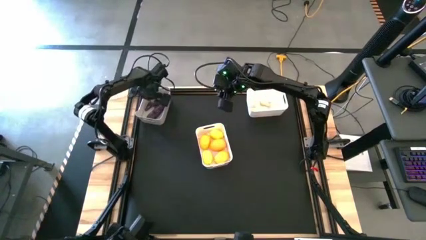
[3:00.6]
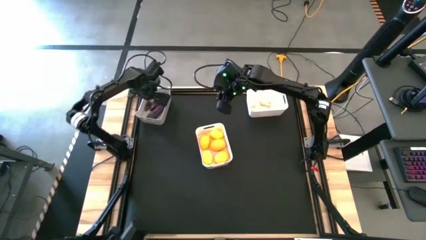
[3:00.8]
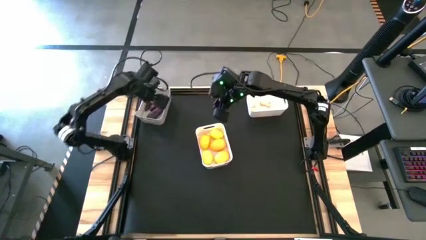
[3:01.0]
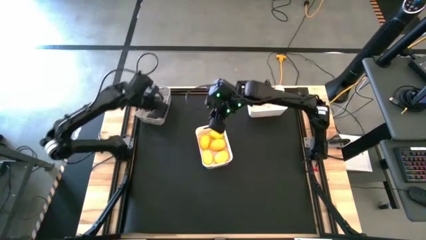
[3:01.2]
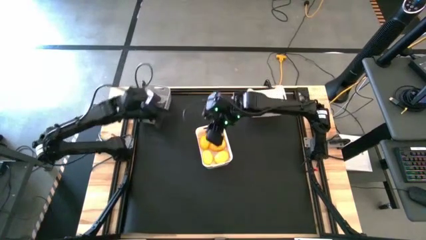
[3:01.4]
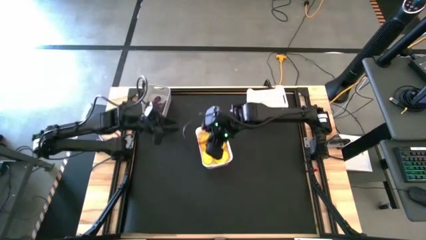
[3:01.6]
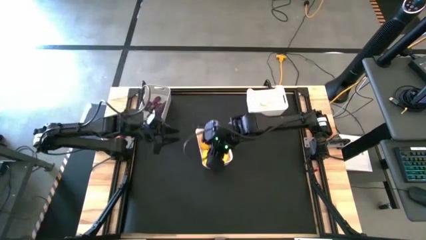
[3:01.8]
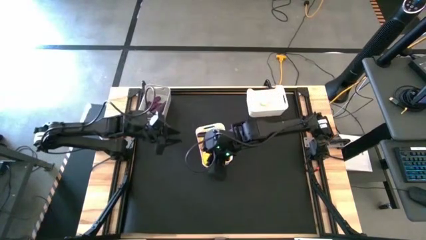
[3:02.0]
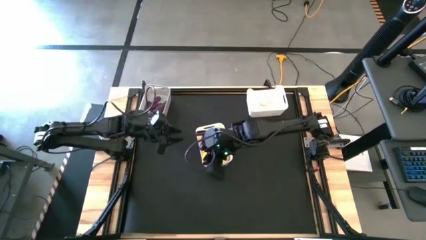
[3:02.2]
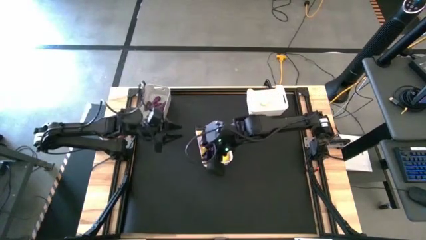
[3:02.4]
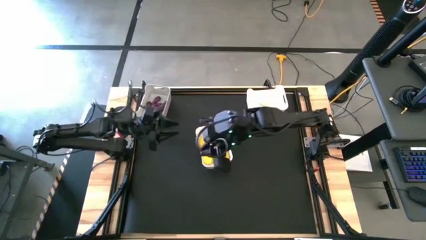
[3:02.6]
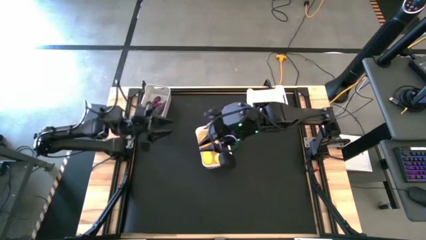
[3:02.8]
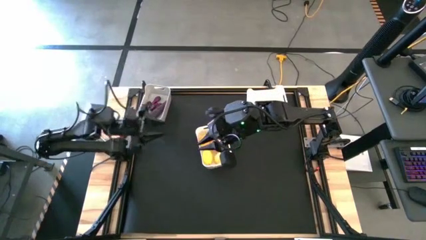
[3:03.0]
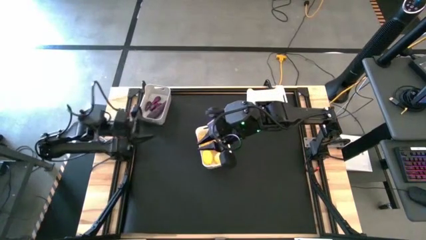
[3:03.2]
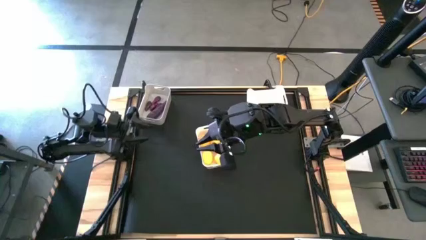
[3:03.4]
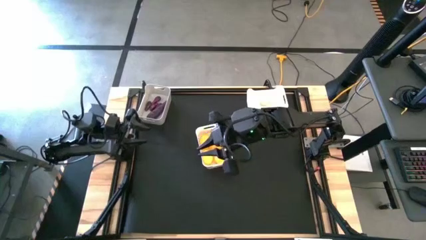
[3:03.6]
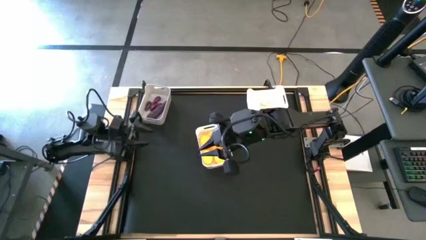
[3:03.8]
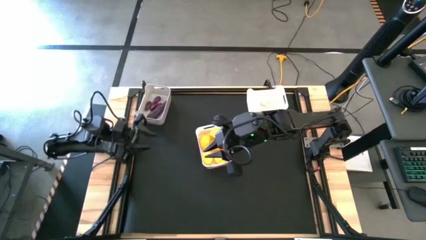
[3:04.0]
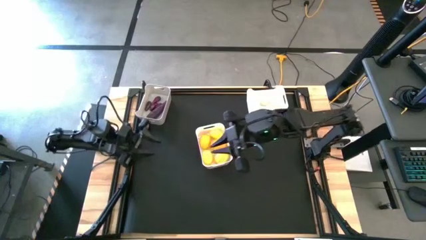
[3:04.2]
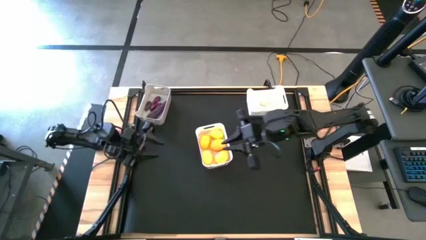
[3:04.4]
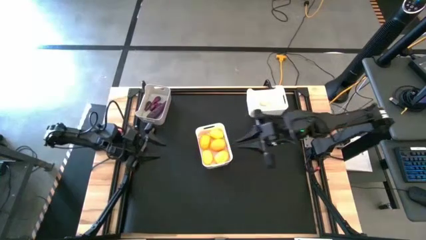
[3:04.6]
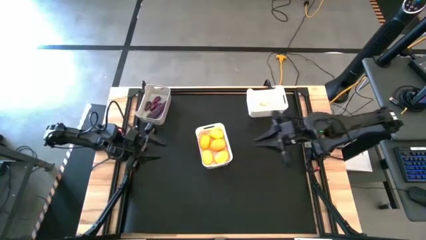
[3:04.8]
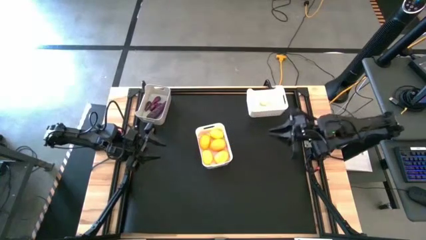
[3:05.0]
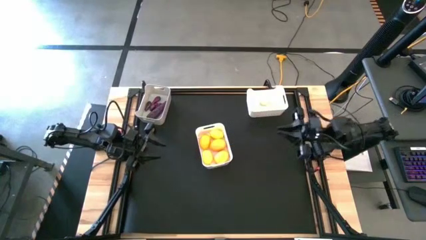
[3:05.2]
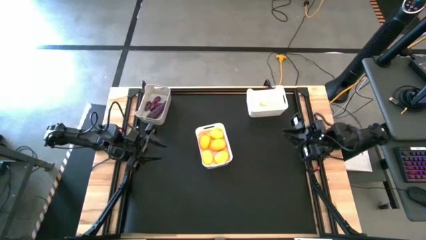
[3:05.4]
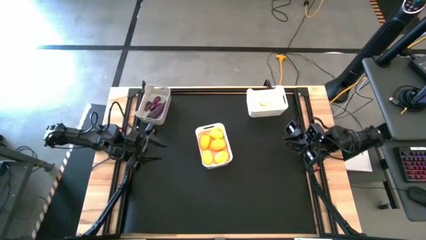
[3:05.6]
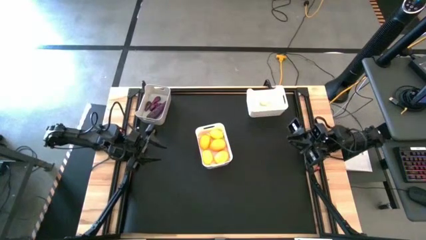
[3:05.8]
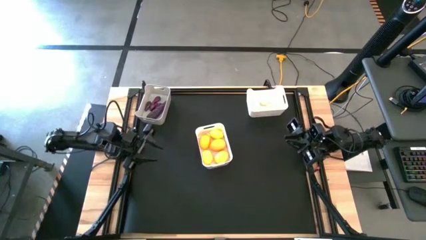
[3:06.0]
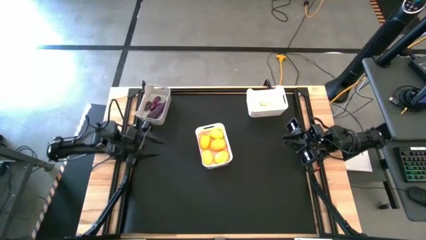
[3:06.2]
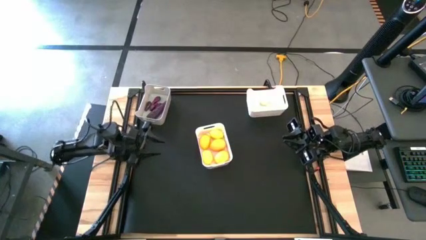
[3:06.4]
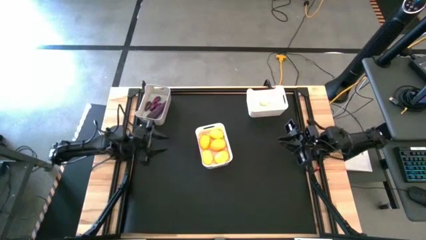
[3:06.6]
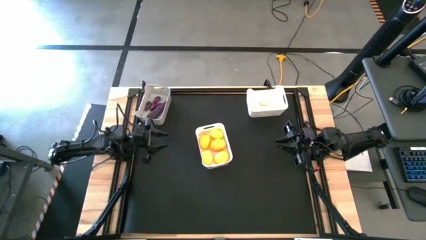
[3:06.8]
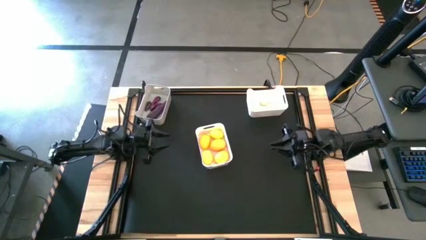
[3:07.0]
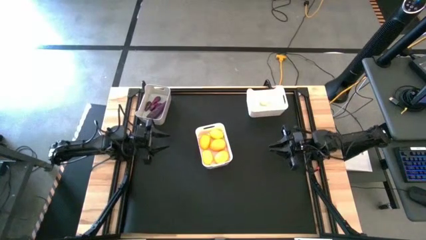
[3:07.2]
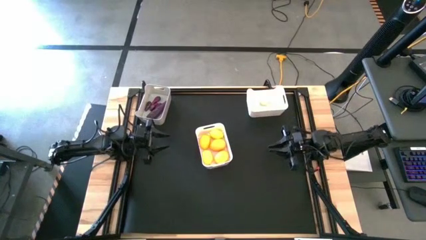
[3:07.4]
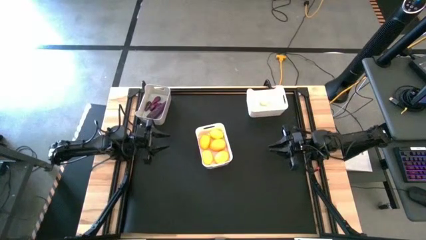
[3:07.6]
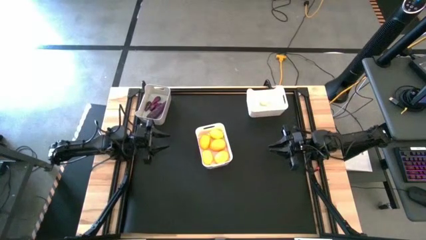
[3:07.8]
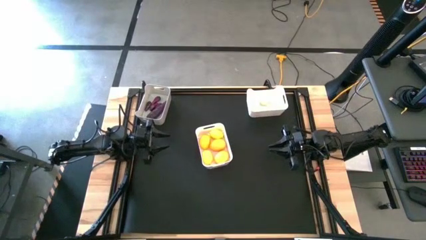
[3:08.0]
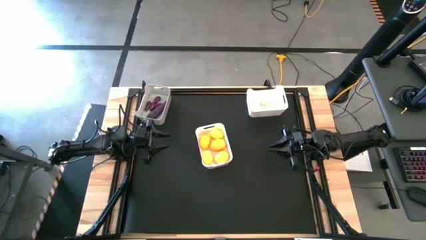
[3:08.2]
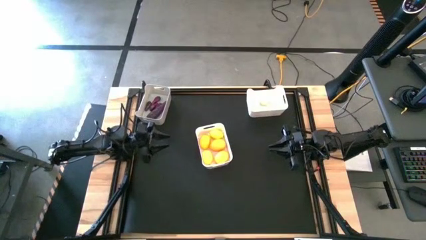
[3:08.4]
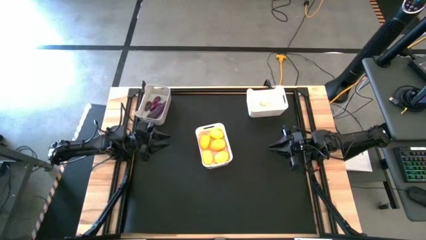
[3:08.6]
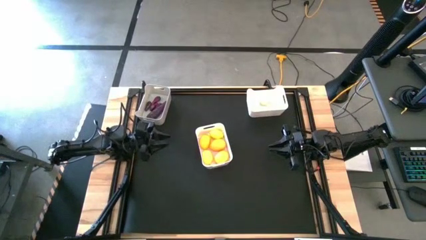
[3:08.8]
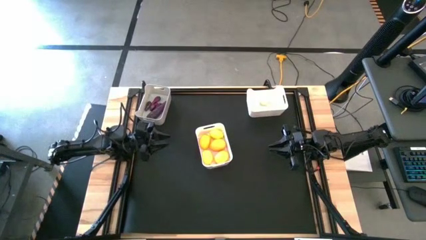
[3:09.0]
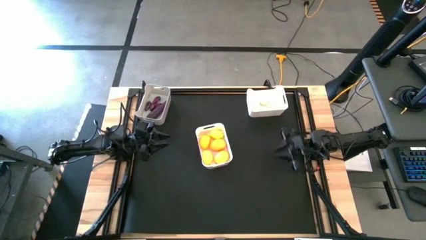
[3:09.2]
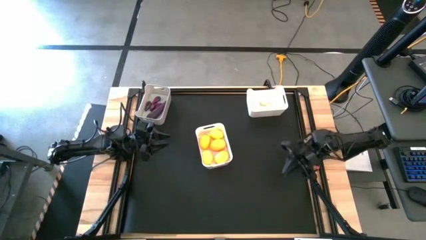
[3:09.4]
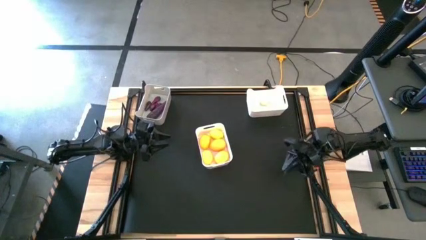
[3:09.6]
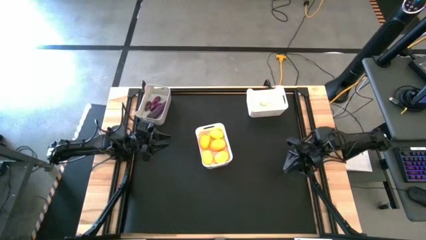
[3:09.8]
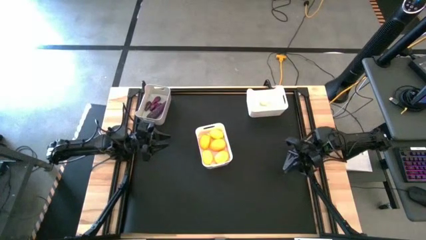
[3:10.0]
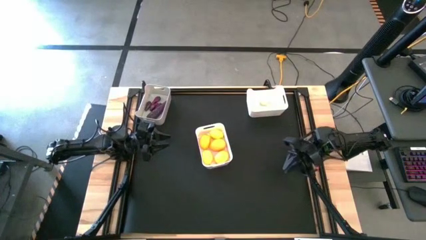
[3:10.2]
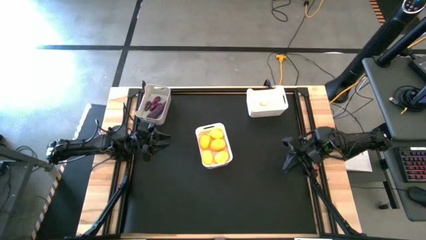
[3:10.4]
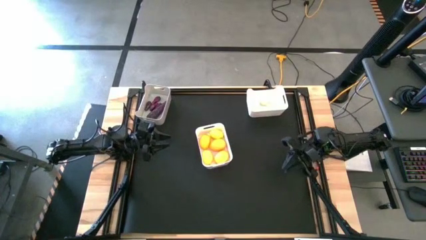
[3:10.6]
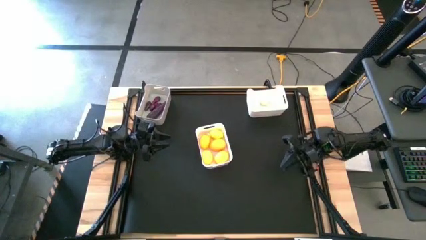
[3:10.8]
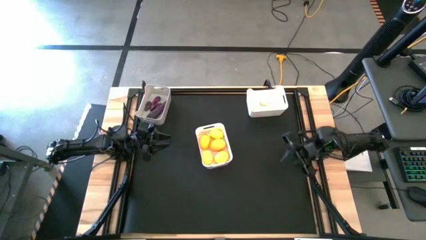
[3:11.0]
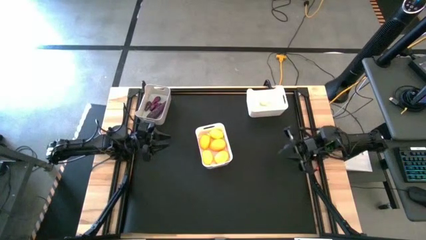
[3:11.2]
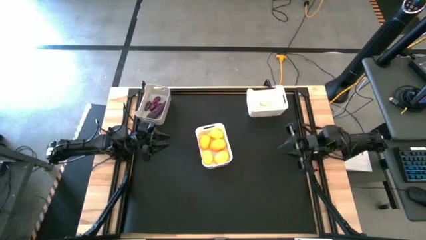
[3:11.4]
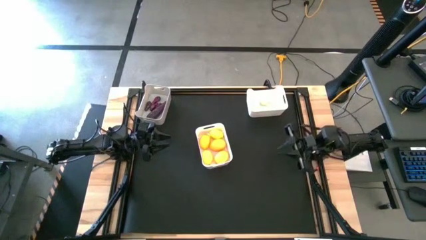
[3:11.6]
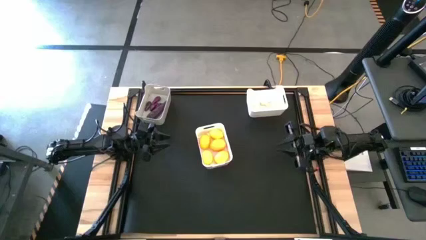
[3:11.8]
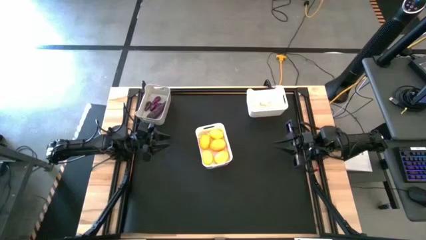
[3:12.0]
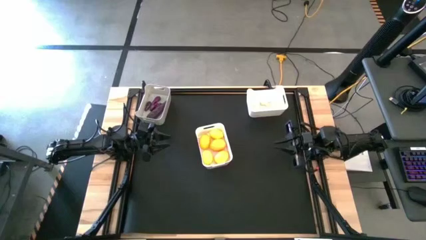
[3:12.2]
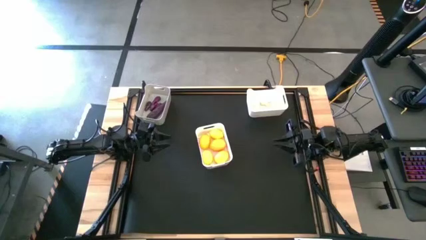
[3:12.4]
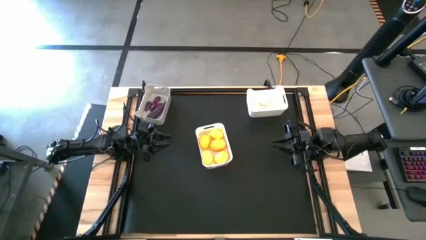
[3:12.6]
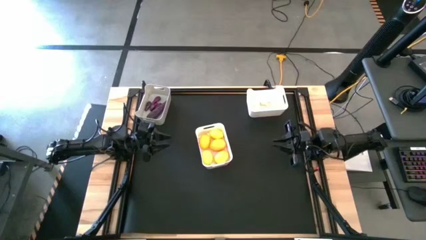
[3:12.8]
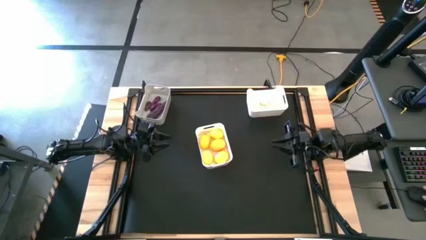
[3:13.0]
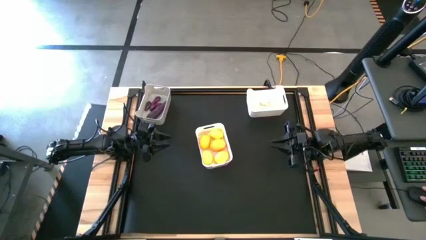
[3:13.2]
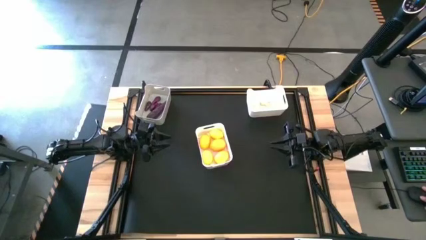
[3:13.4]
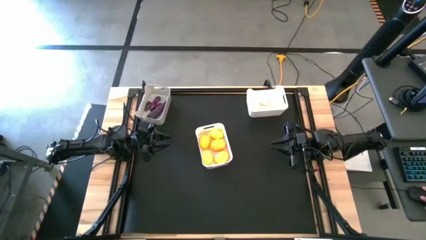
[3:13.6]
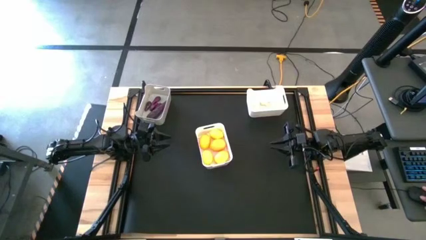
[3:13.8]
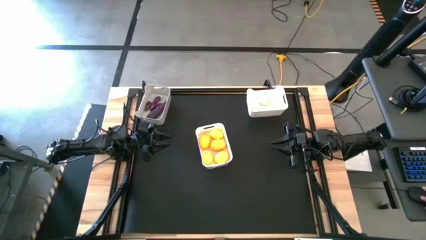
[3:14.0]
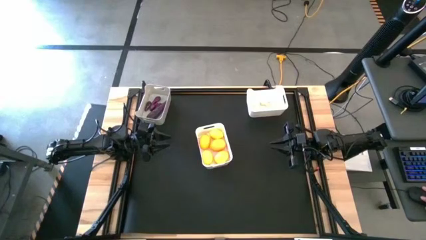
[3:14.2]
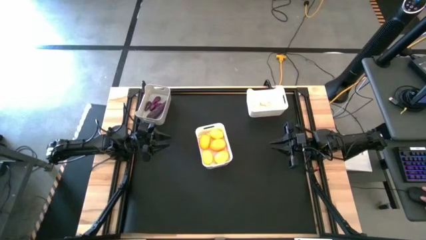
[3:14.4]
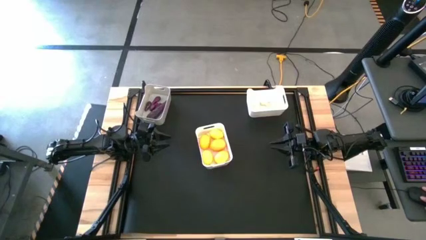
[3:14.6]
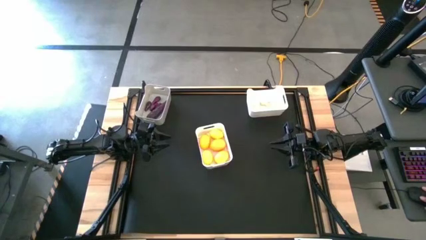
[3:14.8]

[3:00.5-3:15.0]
Task: Sort produce into baskets
Return to Home Position

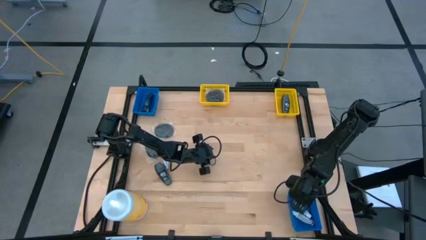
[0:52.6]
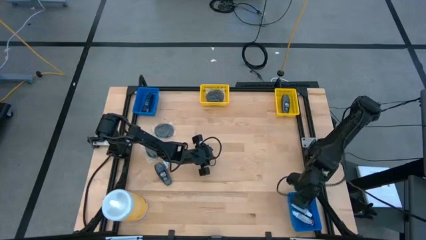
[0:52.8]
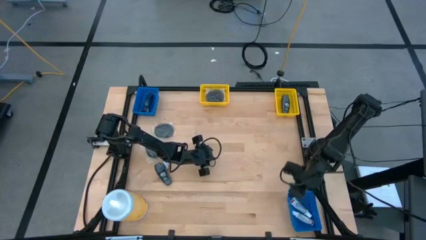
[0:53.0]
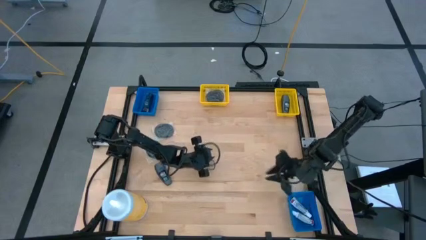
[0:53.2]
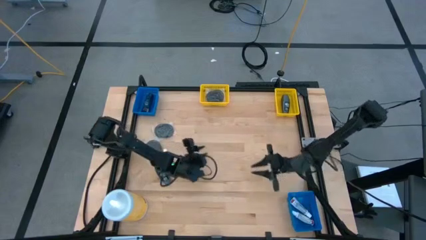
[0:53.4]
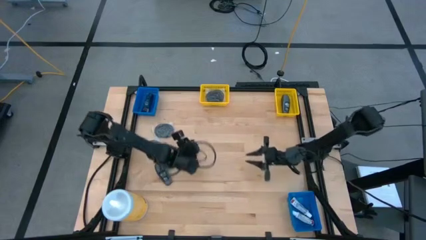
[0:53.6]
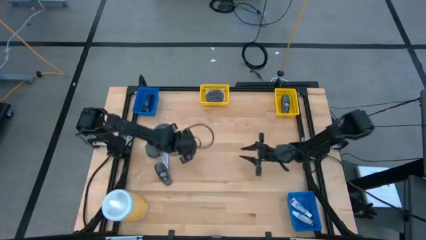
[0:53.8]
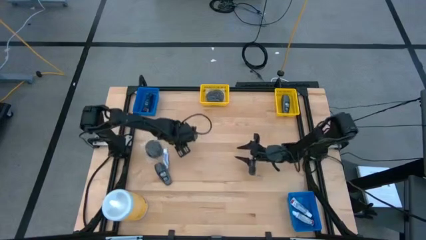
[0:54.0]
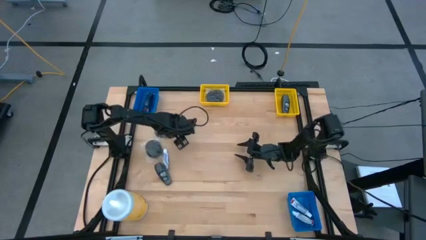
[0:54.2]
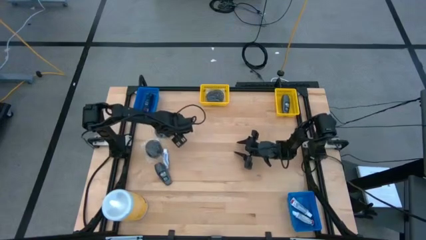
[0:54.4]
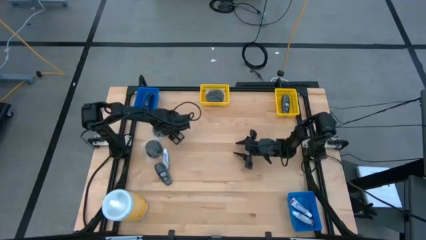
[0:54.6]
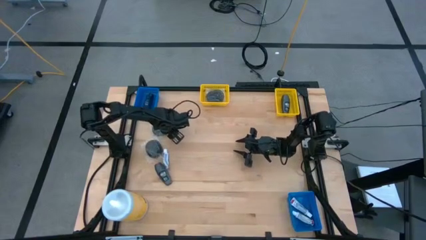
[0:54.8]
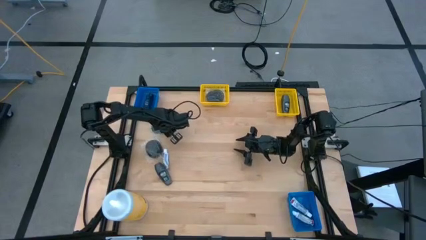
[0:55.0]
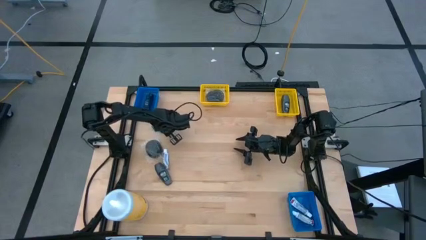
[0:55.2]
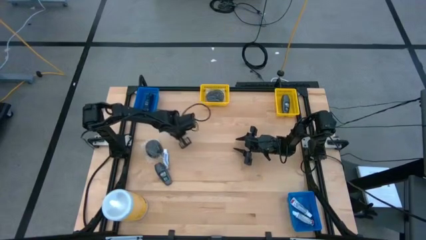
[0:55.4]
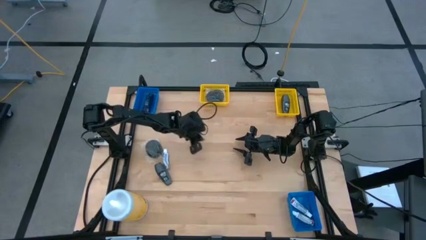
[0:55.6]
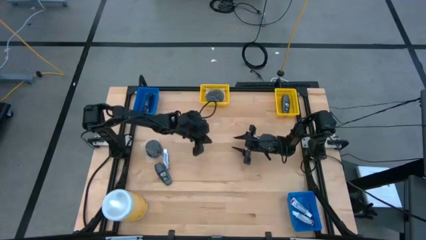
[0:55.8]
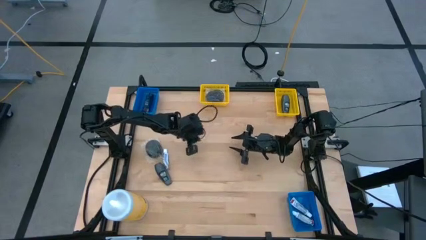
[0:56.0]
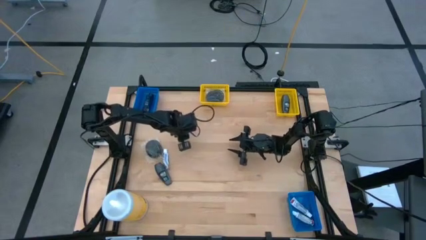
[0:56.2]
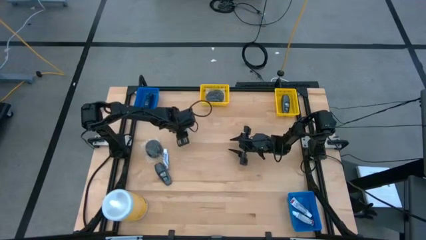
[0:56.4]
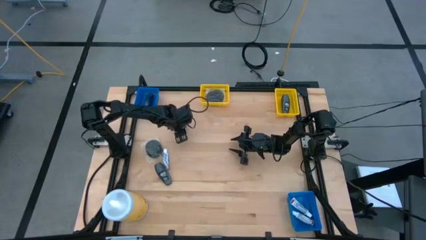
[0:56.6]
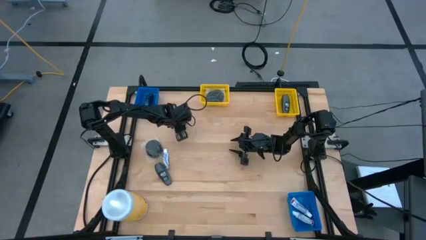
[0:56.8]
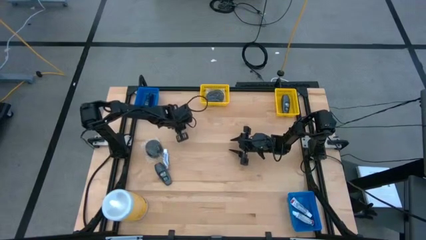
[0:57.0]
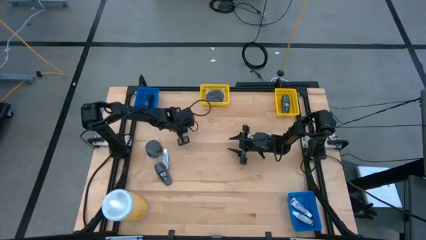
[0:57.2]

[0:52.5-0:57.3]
Task: Pick & Place Travel size toiletries
Put the hairbrush into the left yellow bin
